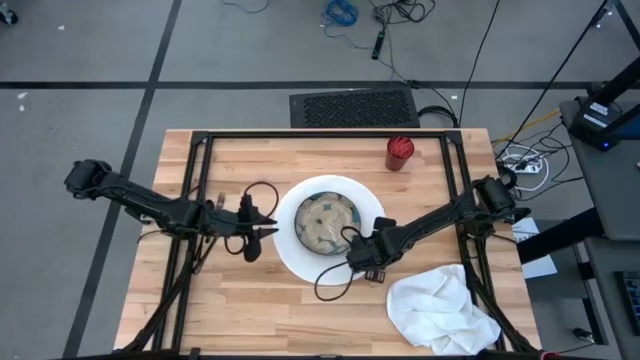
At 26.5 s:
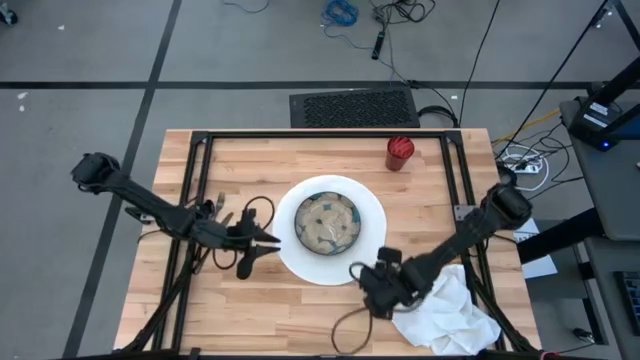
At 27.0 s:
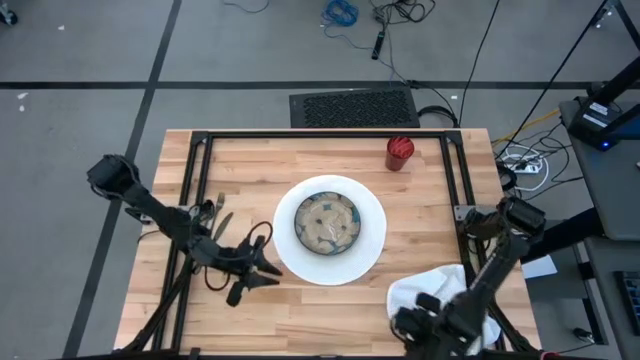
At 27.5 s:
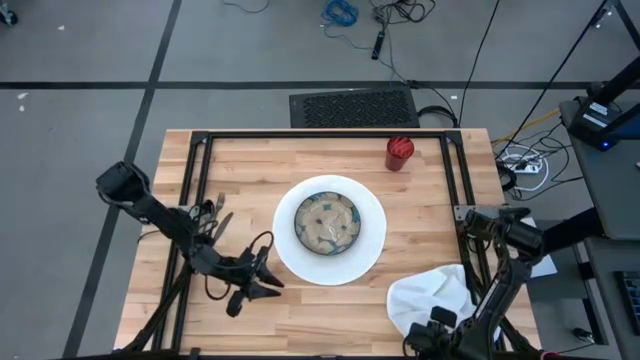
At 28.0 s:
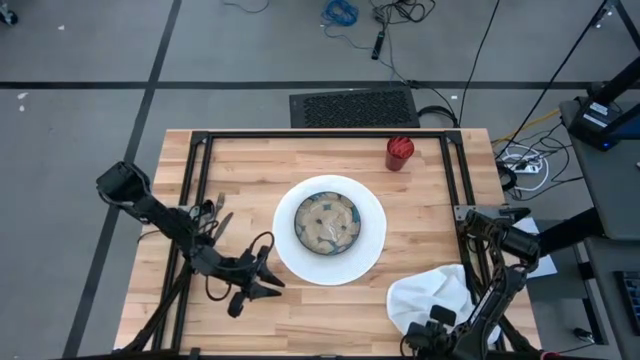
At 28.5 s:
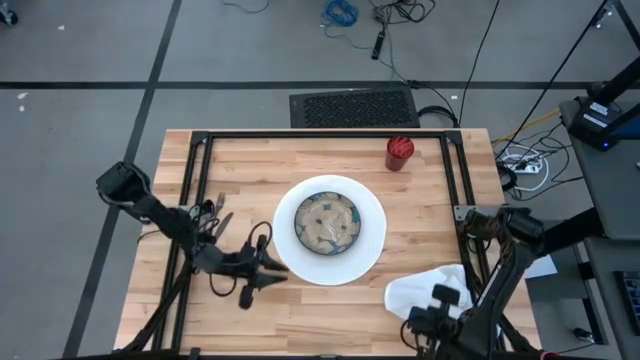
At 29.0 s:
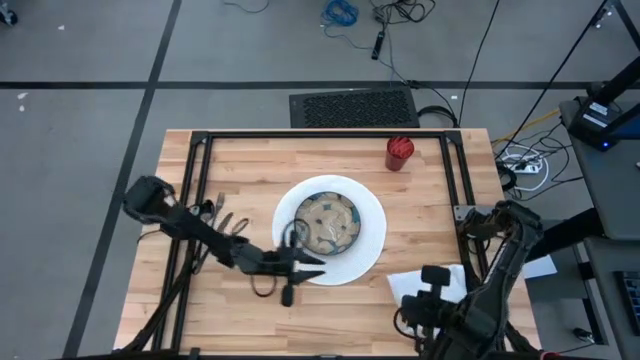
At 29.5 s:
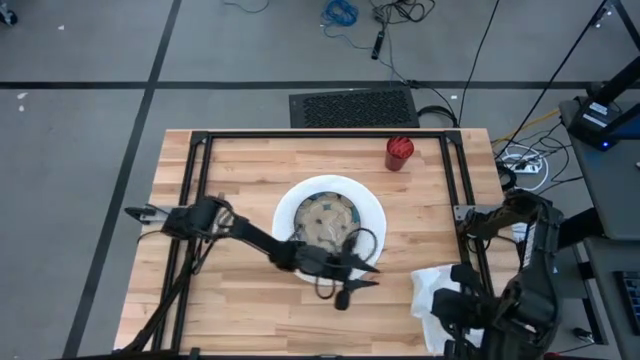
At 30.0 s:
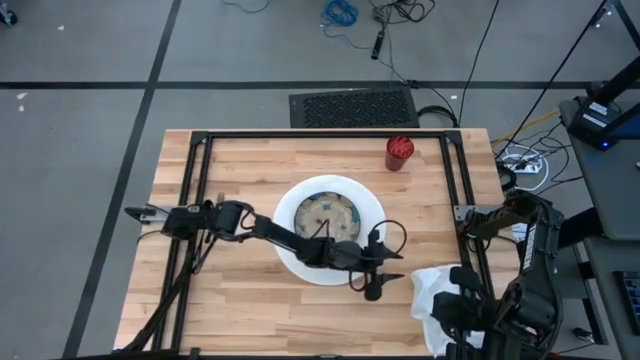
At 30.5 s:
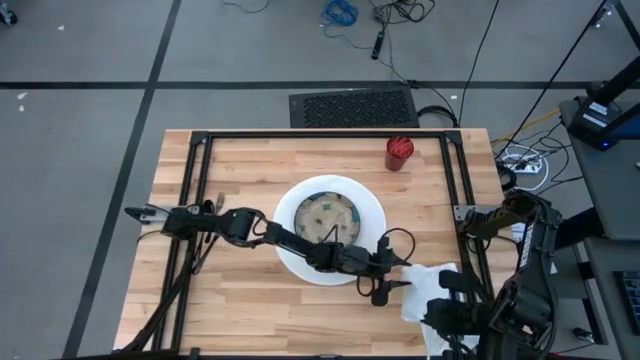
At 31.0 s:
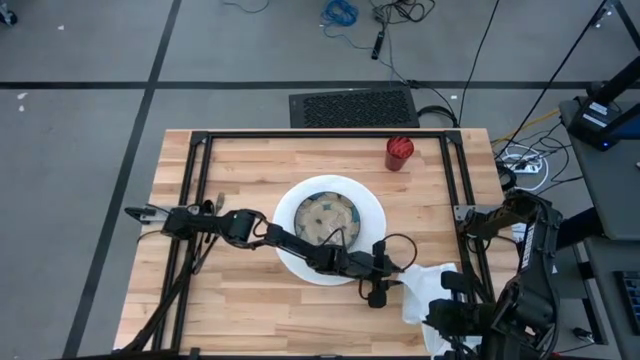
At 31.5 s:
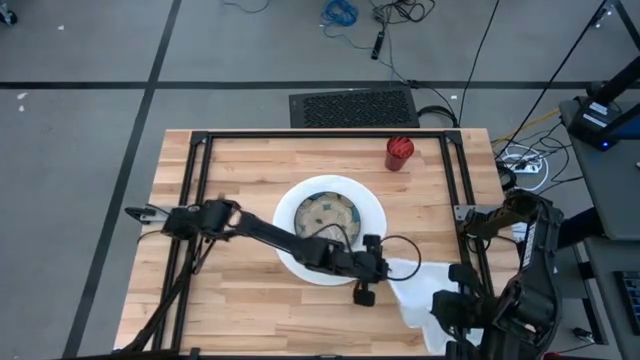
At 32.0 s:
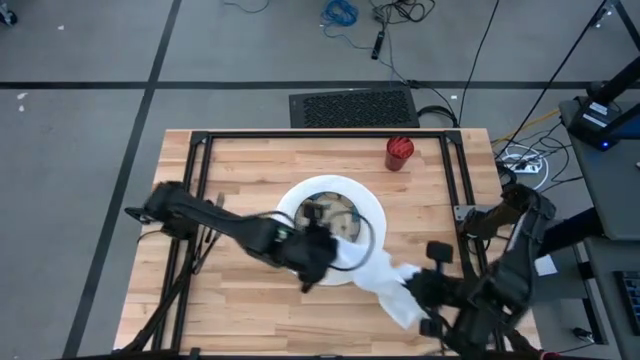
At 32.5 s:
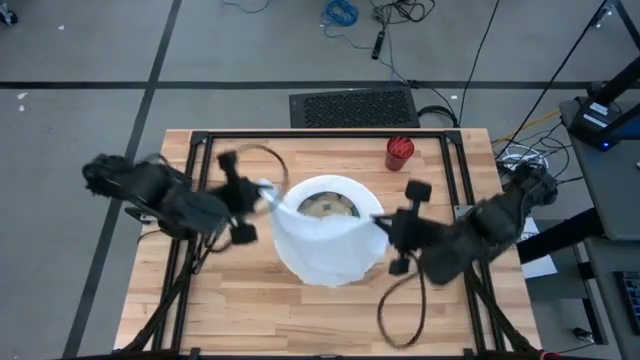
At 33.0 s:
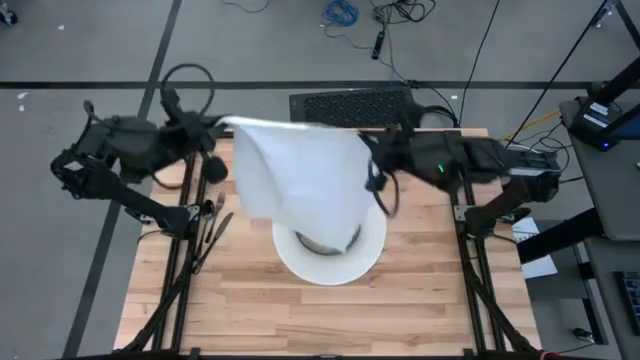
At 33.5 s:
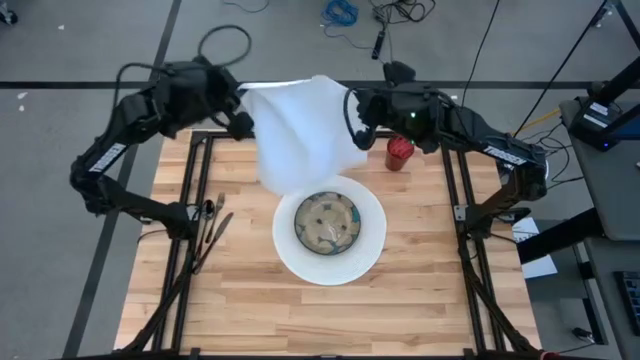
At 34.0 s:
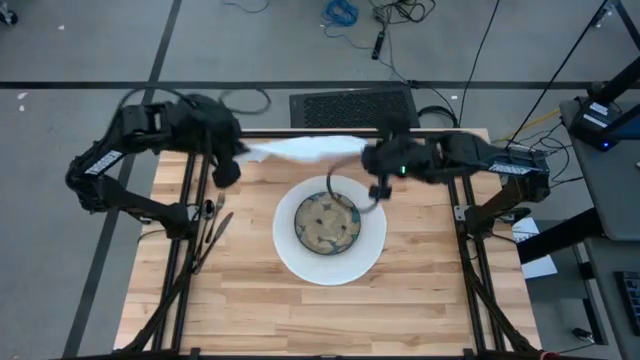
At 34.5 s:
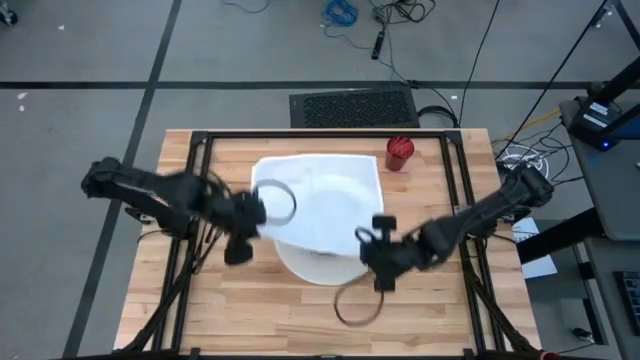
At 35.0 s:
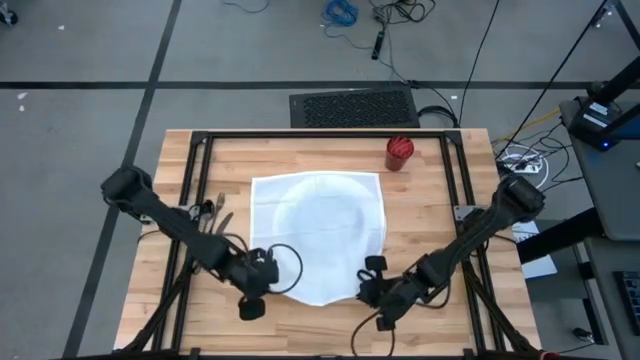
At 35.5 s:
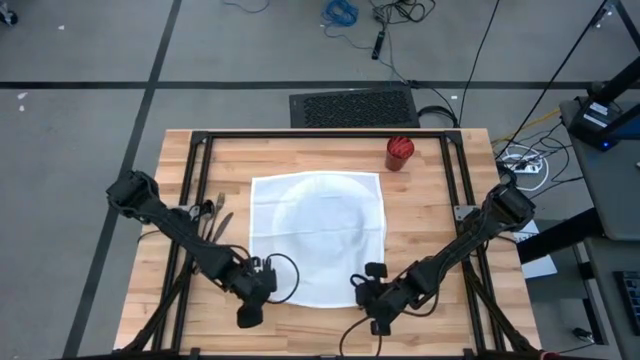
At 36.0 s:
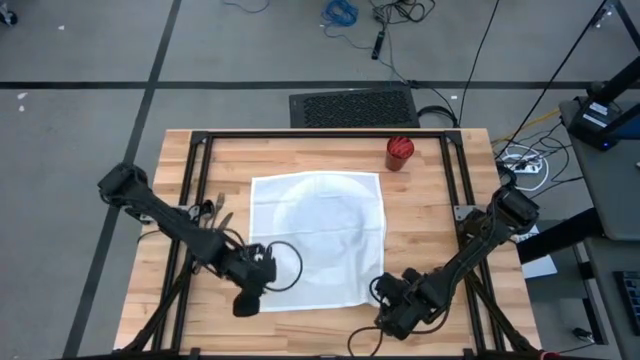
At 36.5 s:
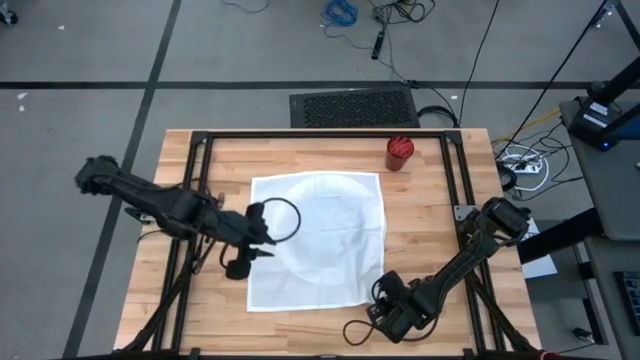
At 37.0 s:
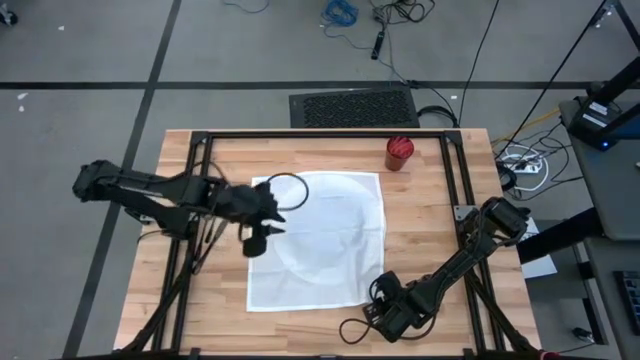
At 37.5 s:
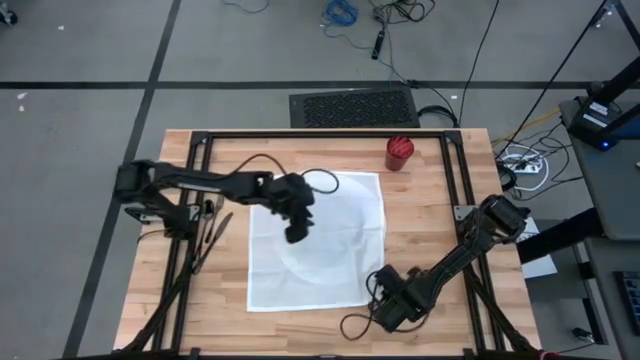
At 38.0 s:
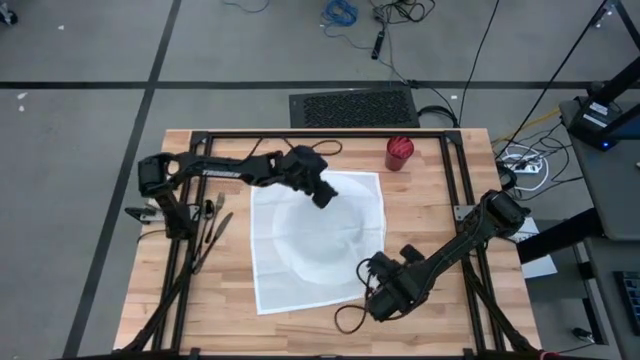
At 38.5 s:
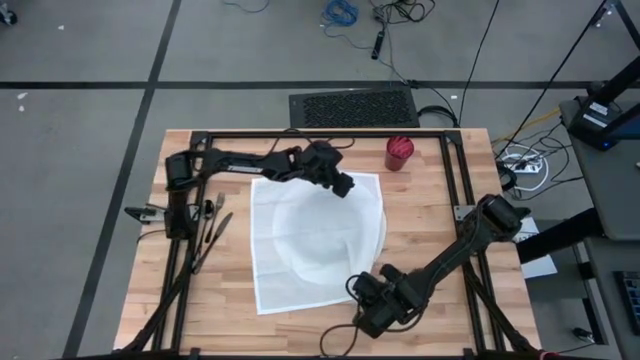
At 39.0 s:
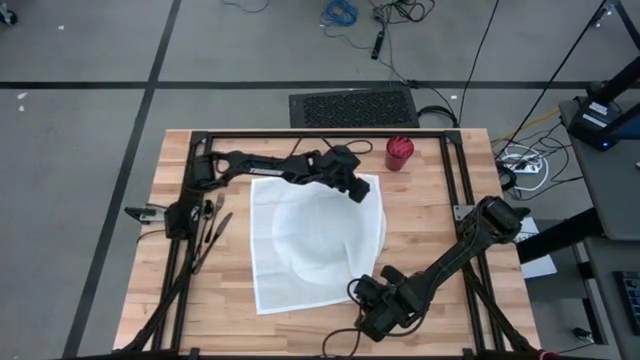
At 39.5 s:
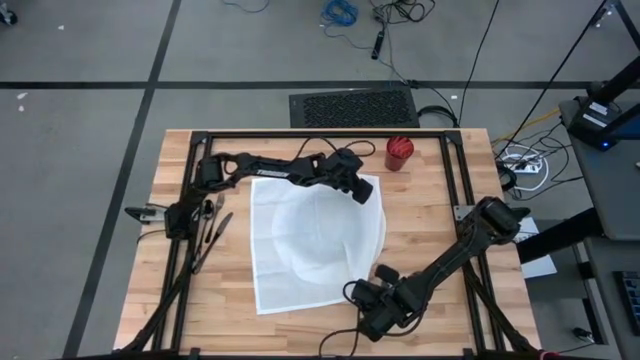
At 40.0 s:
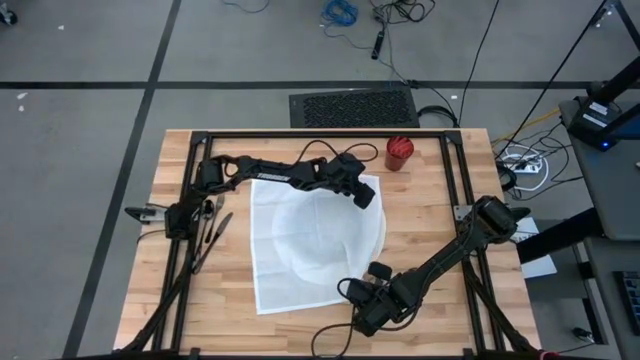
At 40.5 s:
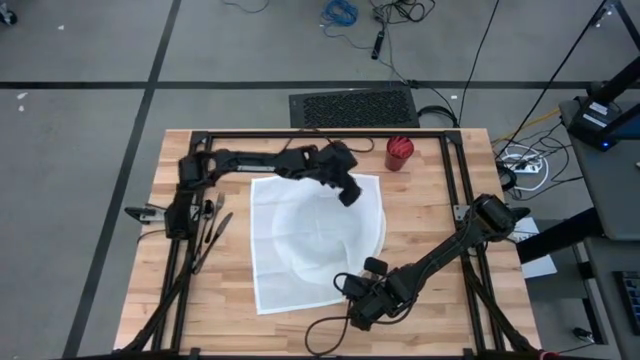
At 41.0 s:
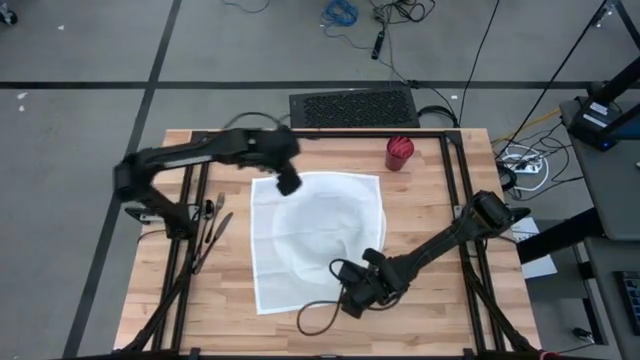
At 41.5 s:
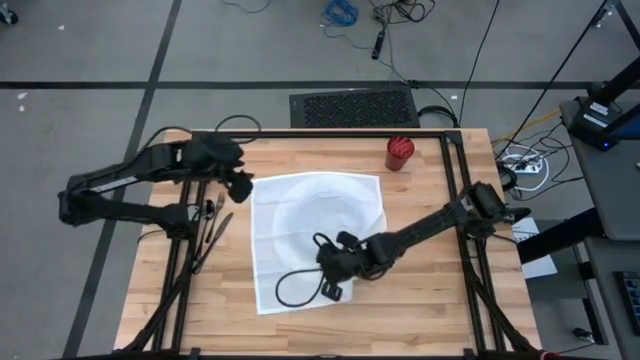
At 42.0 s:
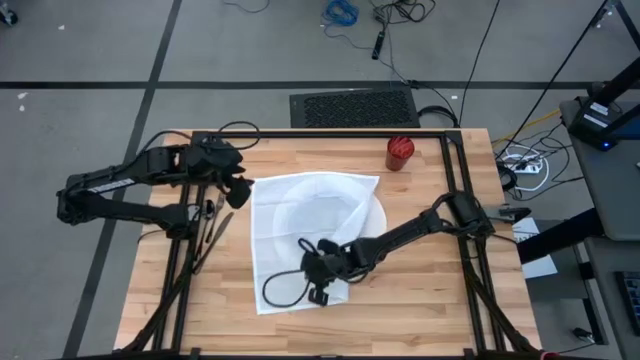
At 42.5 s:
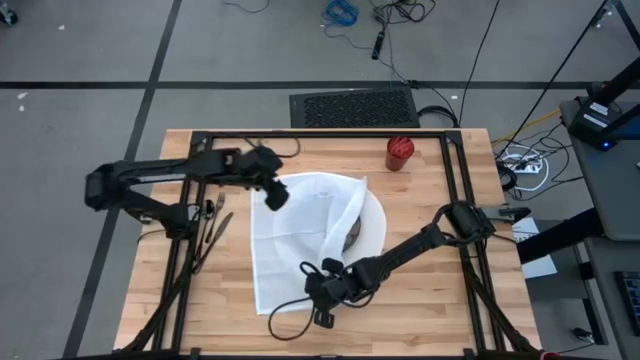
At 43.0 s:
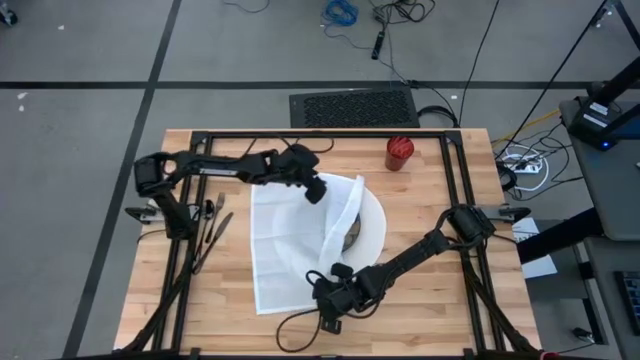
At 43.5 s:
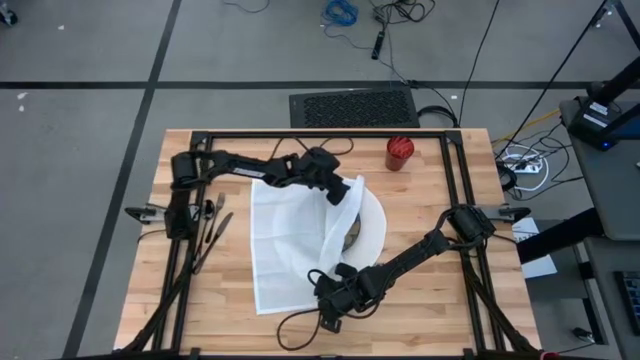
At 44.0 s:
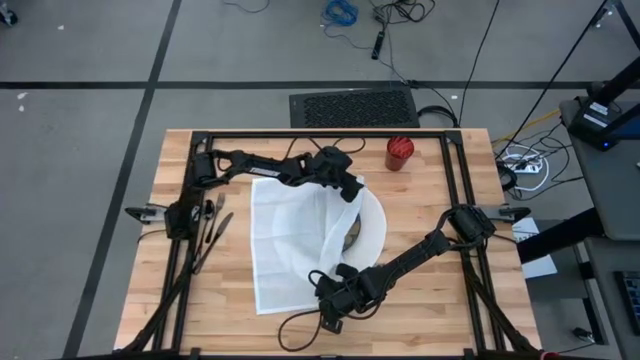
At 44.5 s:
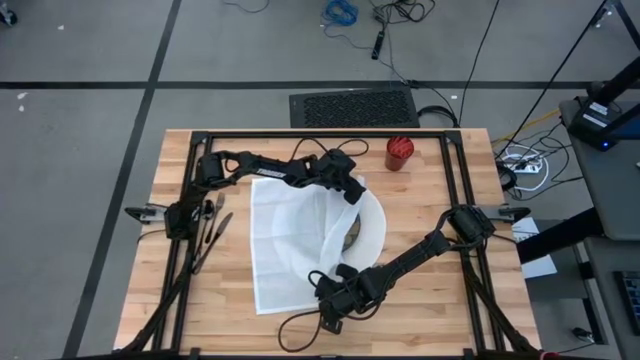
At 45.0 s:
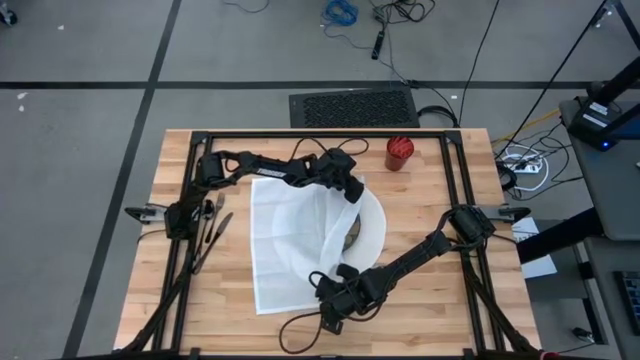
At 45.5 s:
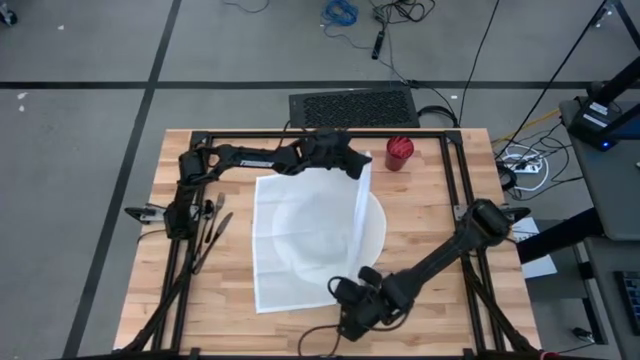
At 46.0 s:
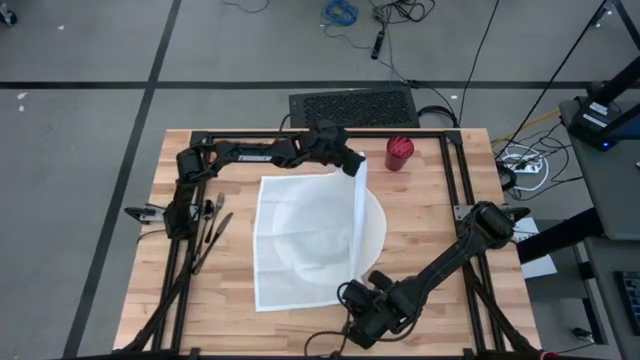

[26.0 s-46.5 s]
Task: Set table place
Fold the white table napkin

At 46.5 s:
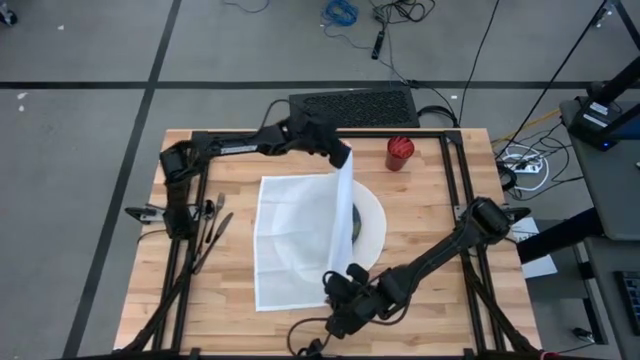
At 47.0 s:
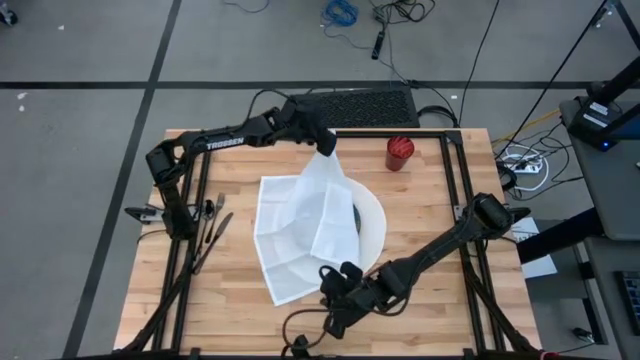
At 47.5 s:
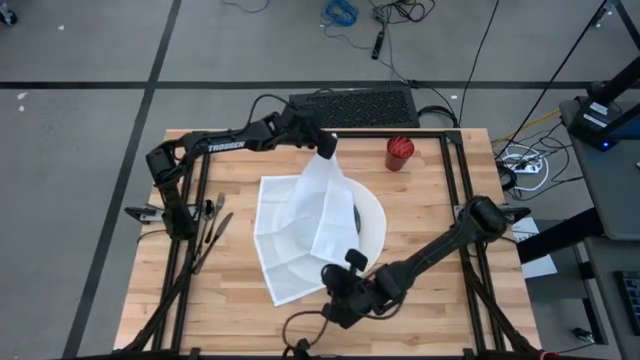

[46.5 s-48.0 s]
Fold the white table napkin
